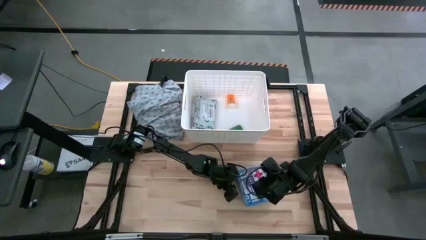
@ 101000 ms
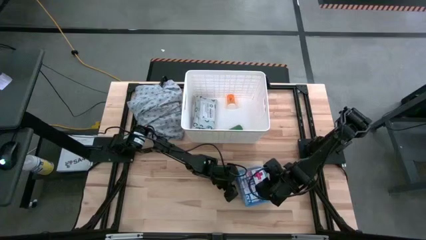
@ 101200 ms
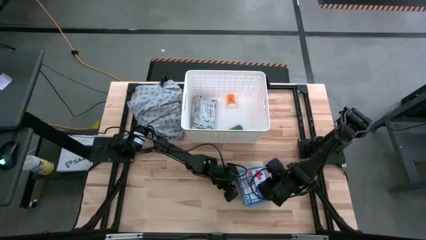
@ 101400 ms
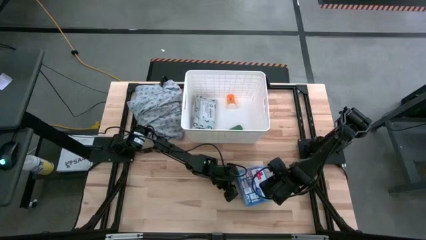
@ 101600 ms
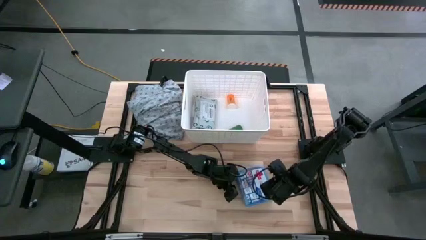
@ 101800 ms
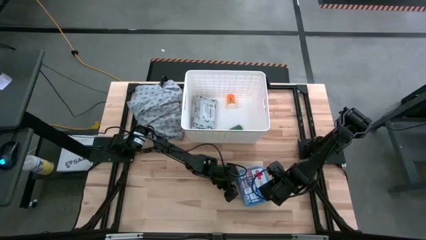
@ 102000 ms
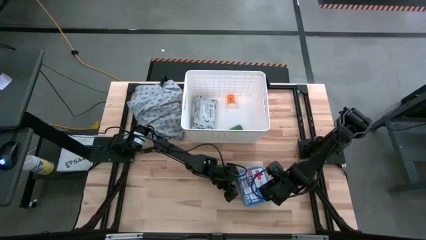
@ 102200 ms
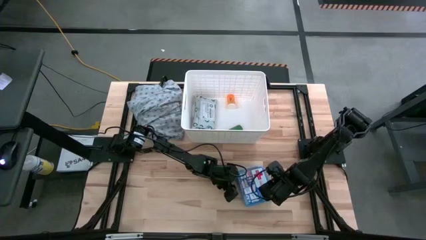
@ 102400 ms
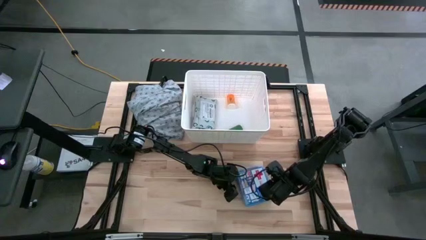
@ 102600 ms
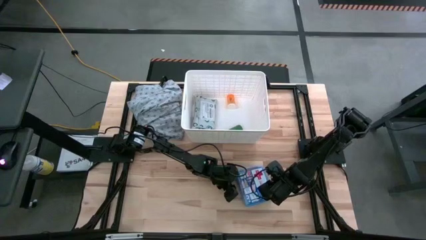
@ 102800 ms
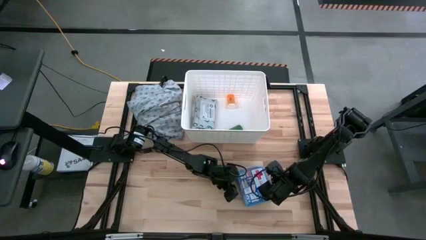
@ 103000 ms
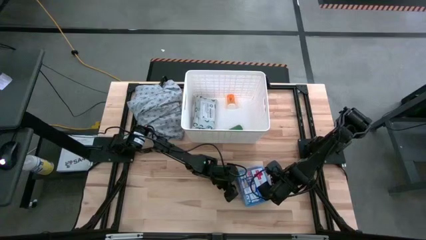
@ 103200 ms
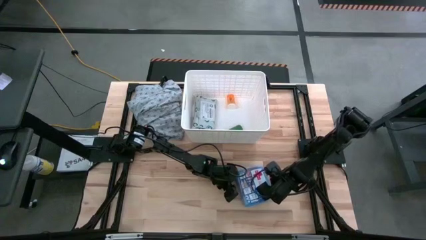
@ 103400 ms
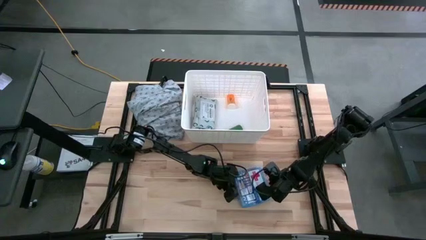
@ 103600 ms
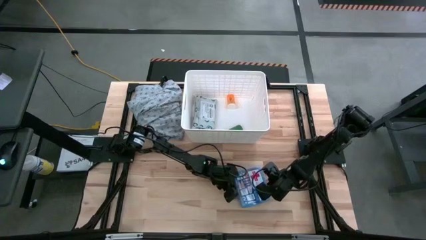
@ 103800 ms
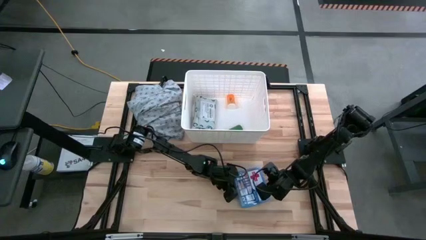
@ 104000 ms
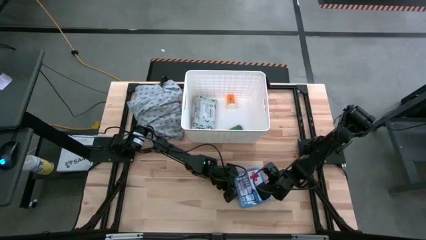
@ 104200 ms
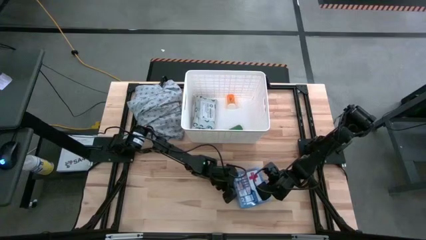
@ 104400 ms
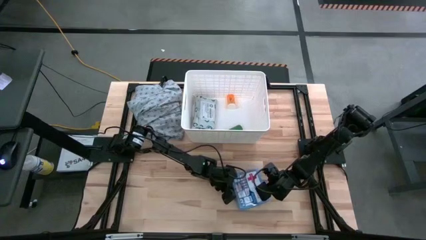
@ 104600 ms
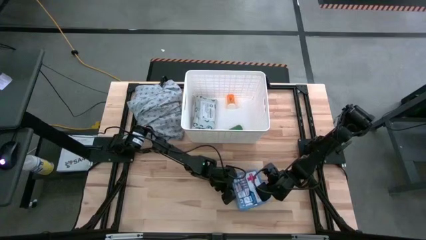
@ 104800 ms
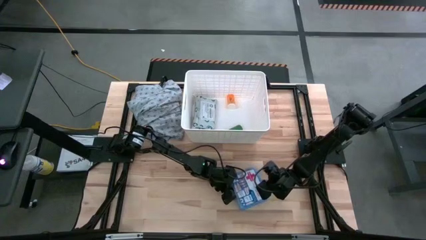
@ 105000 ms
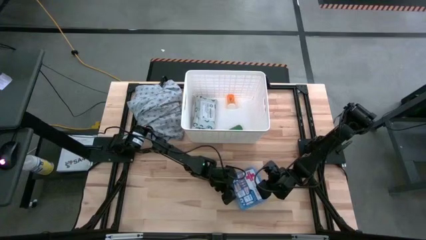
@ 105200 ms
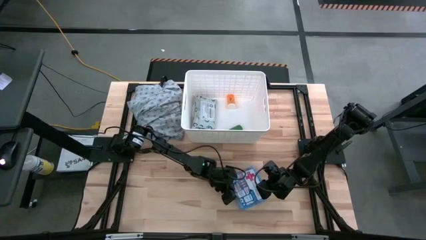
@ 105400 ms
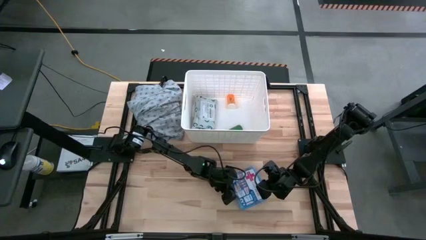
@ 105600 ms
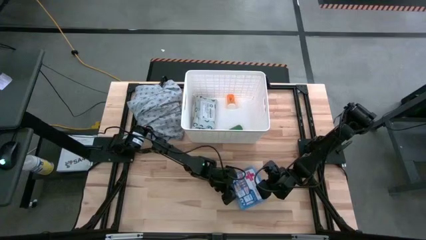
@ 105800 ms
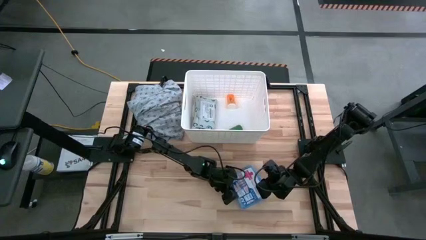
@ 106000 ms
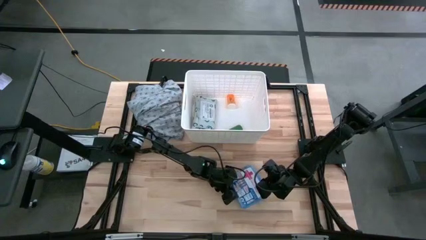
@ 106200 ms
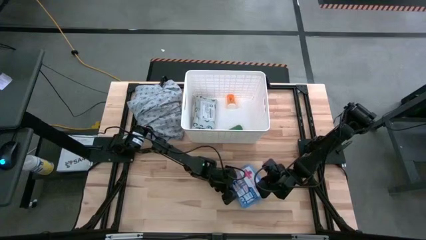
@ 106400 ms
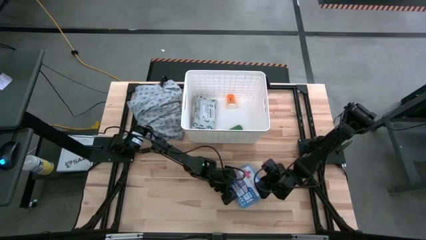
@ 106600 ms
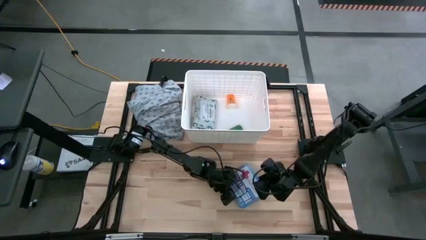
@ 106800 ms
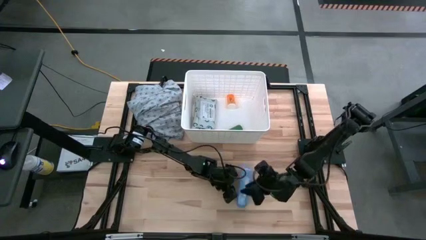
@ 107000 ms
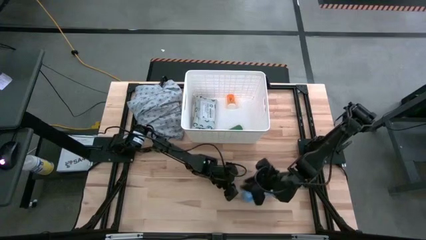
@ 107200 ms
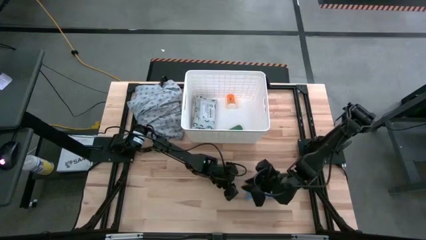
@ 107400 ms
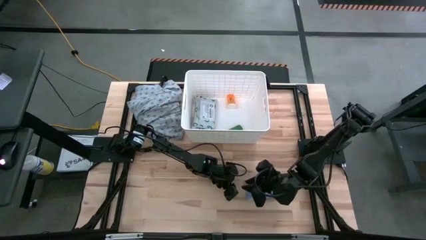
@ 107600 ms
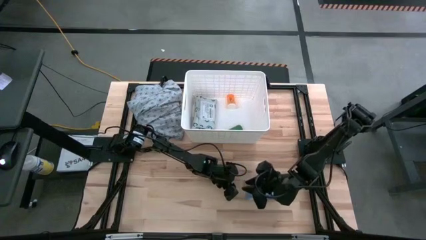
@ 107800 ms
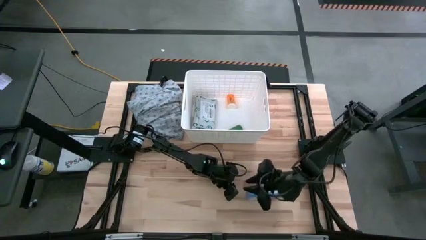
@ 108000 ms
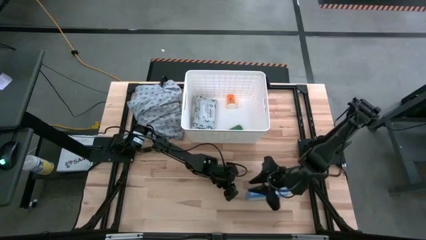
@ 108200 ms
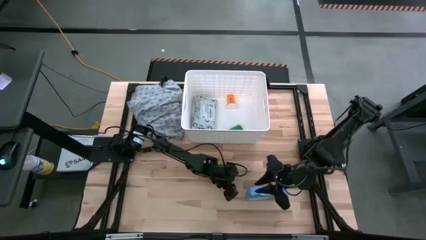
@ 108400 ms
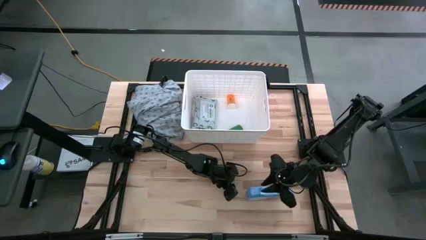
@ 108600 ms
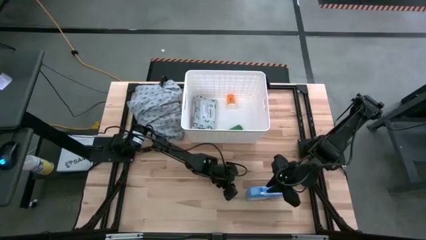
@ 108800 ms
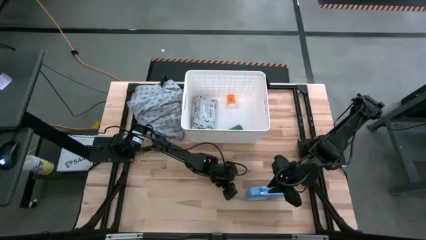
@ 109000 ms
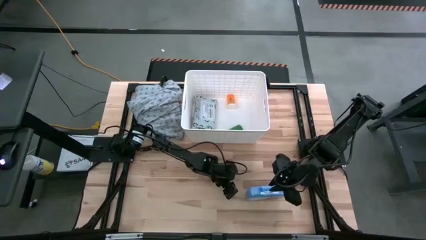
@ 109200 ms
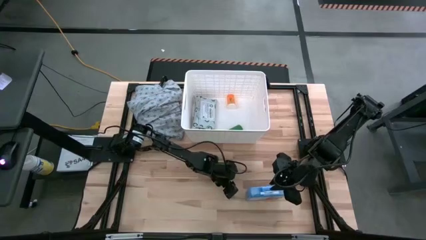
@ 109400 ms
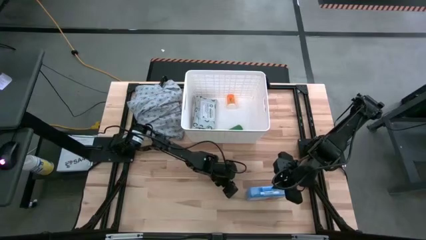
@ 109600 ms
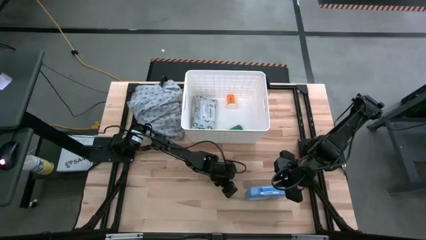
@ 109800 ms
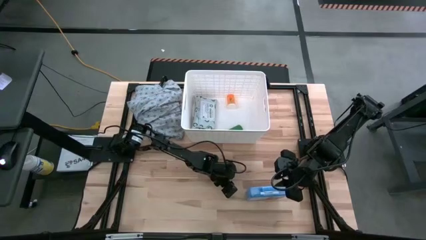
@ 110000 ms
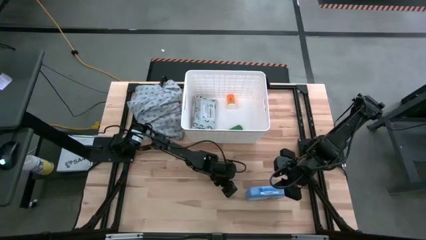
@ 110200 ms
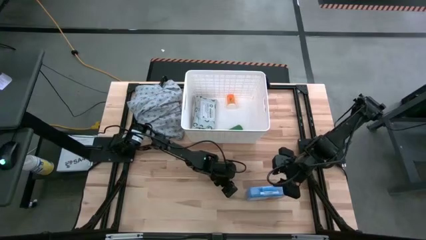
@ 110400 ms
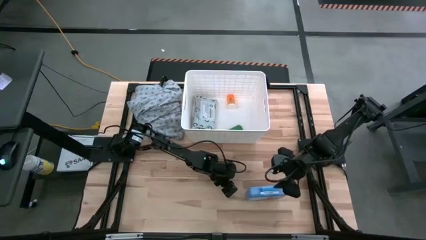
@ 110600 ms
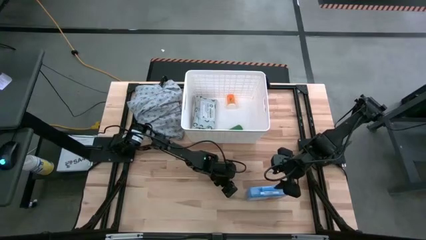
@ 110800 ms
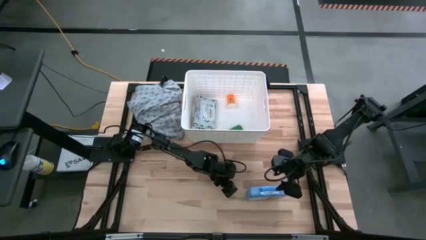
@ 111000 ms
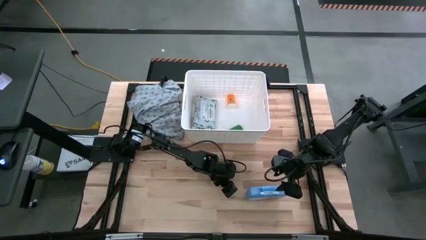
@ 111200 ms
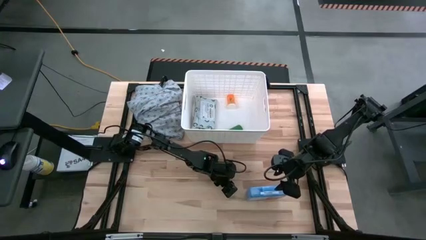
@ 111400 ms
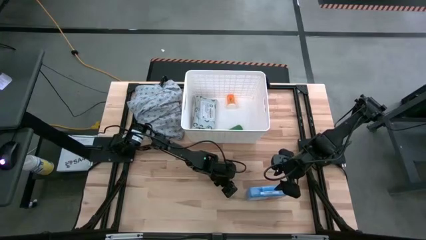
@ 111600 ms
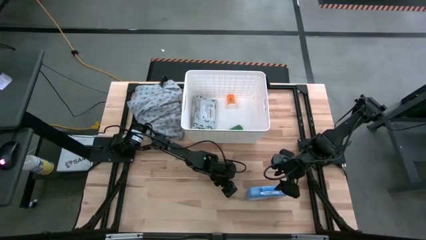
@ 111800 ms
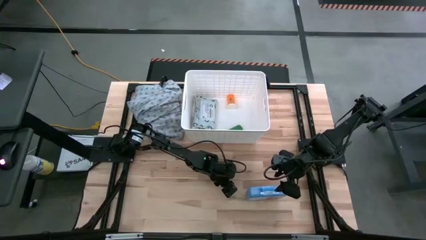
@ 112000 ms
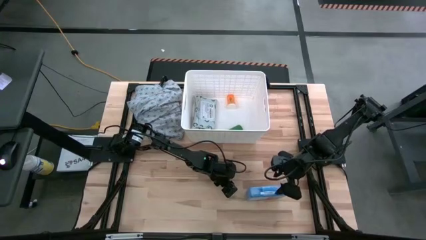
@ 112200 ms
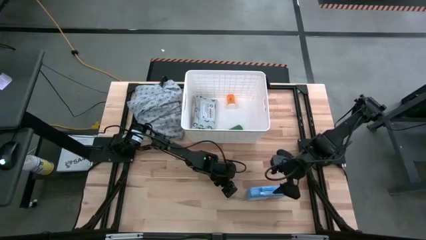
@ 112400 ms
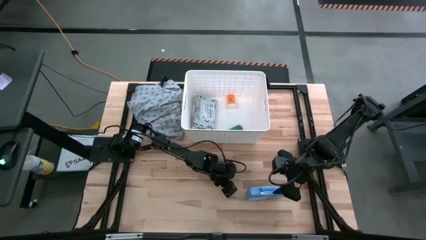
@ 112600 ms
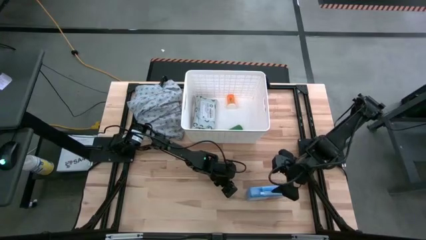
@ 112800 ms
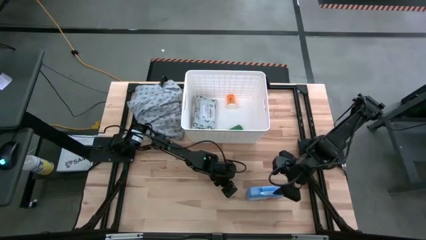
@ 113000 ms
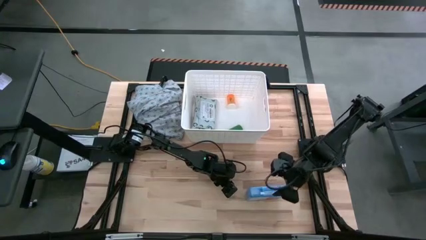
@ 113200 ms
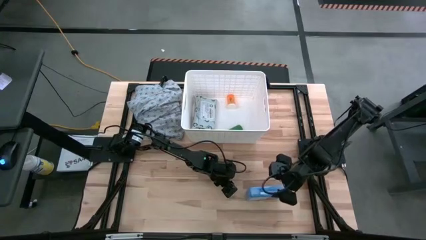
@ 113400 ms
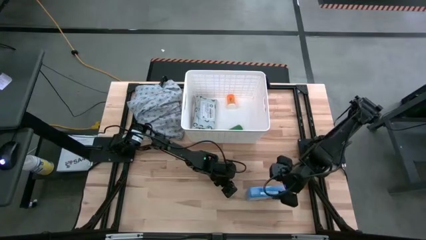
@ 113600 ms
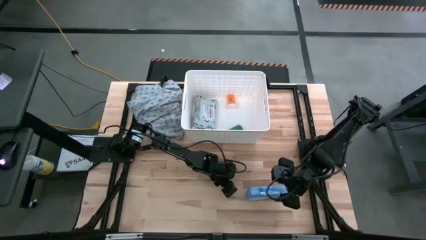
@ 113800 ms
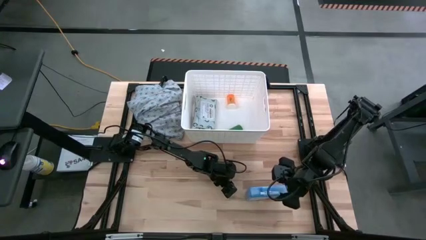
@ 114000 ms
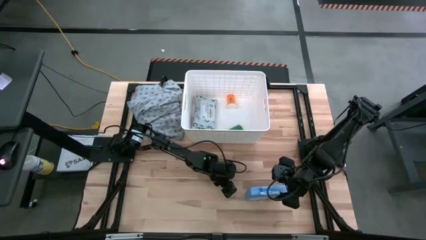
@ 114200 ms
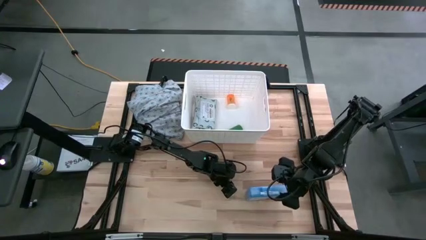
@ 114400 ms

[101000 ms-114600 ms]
Task: Pick & place medical supplies in basket/bin
Put the blue first aid kit in the white bin
